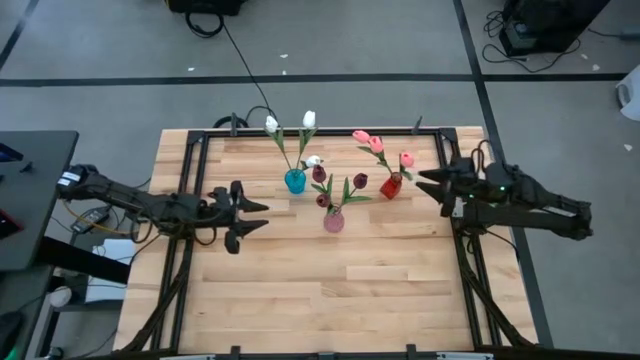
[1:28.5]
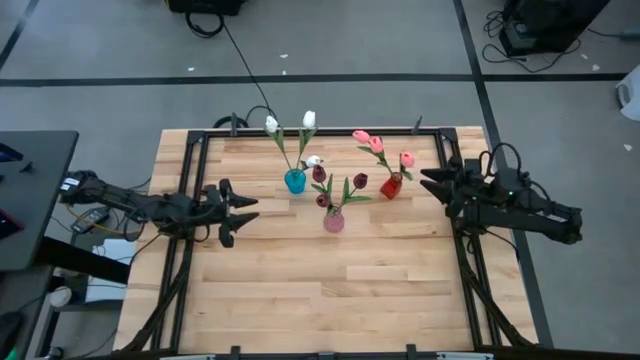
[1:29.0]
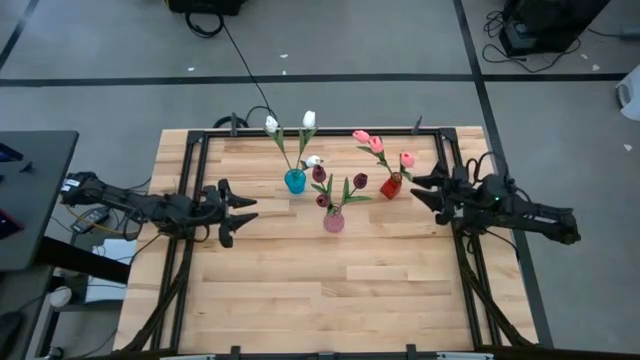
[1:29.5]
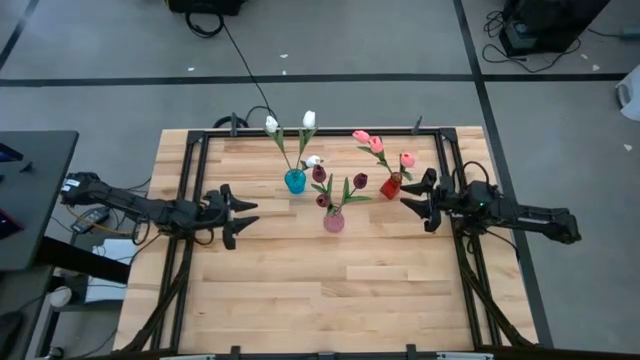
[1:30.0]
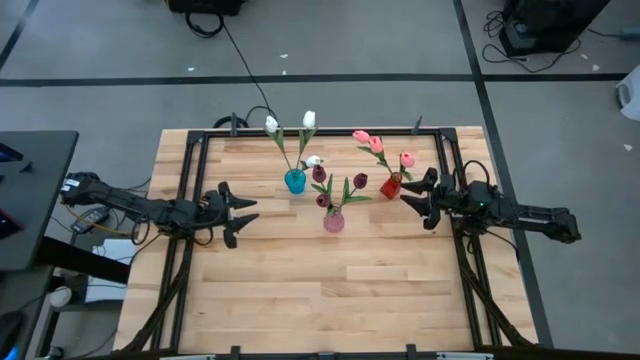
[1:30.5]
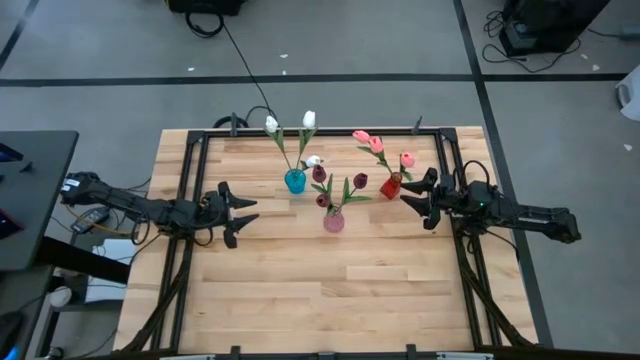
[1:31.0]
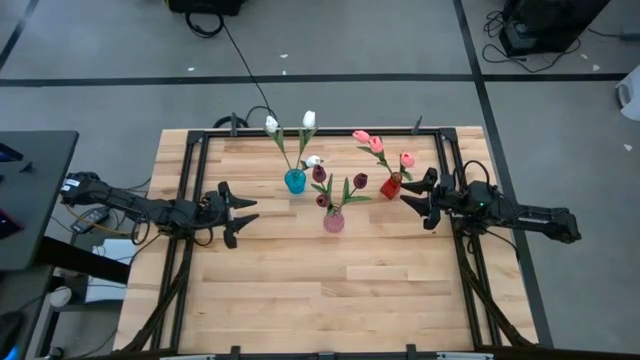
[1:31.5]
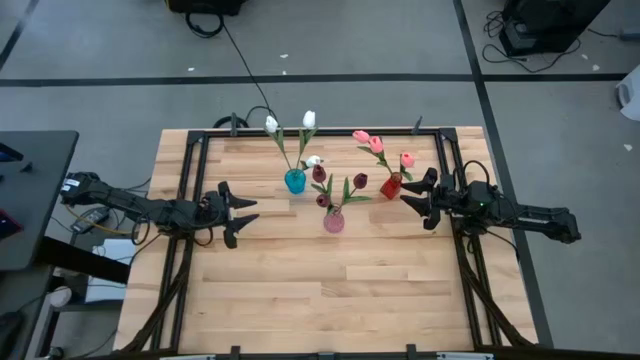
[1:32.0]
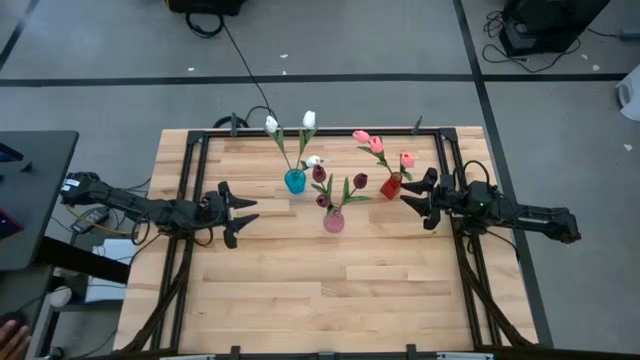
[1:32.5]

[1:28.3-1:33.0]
Task: Sort flowers into vase by color
Return to Home Position

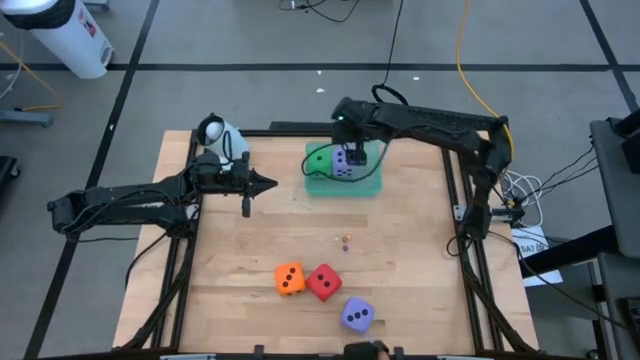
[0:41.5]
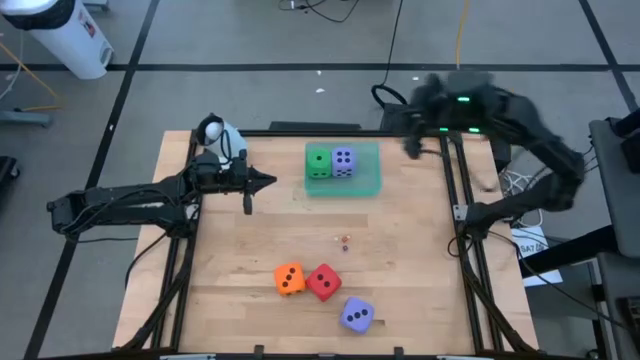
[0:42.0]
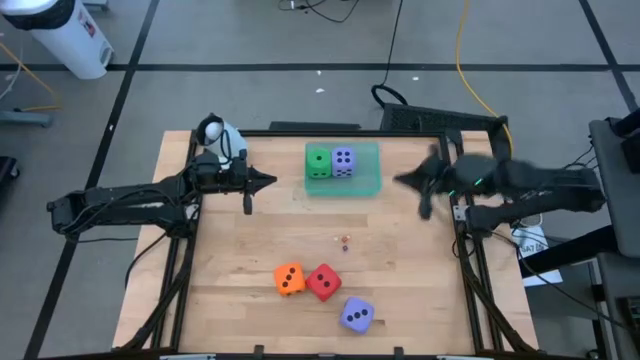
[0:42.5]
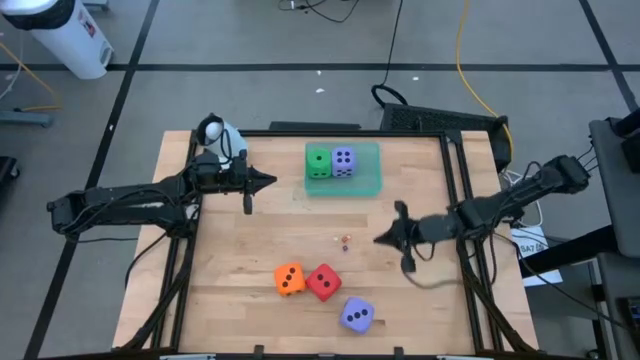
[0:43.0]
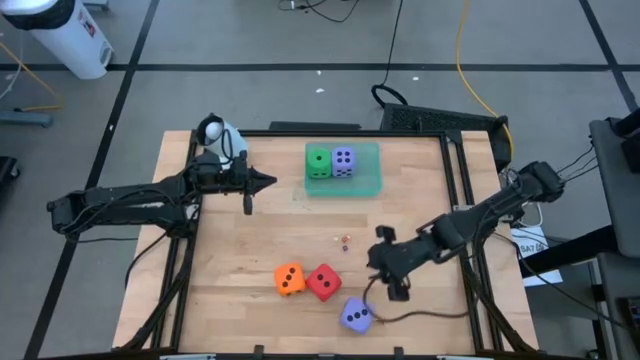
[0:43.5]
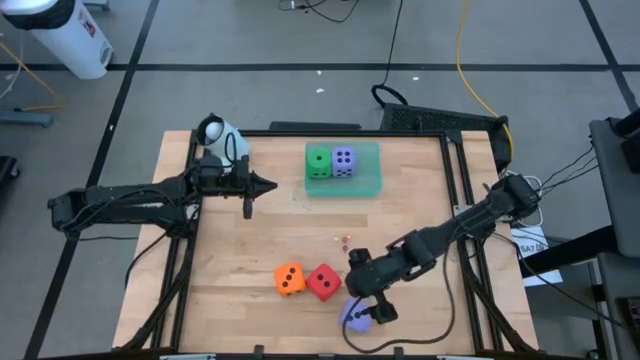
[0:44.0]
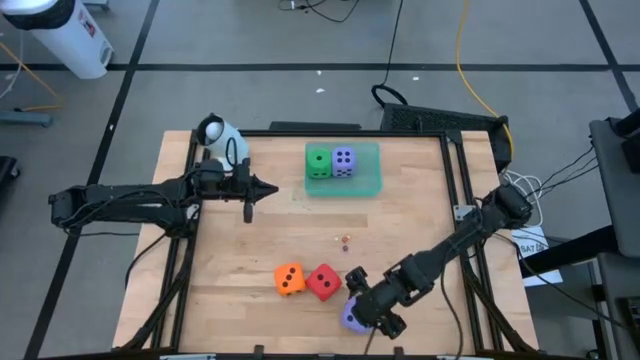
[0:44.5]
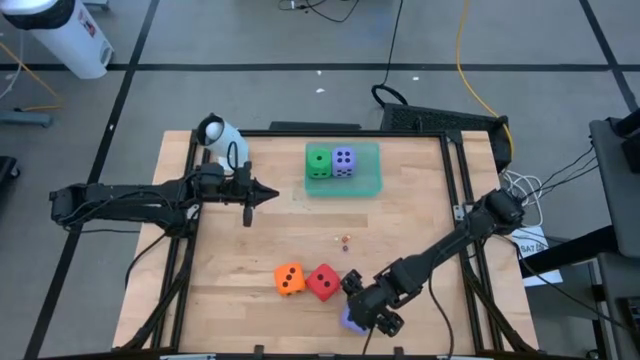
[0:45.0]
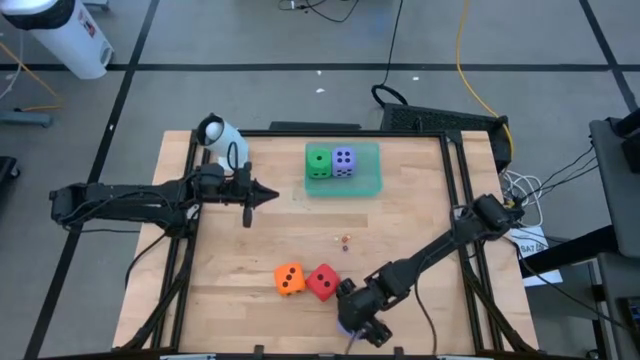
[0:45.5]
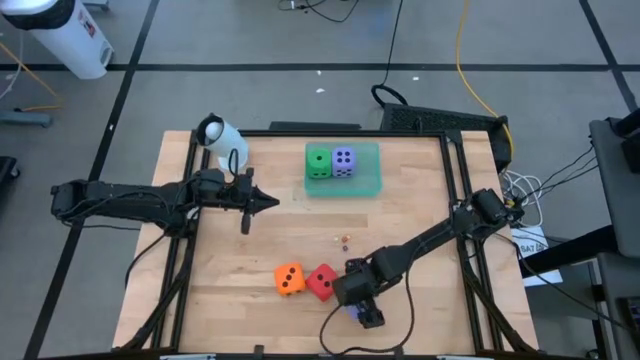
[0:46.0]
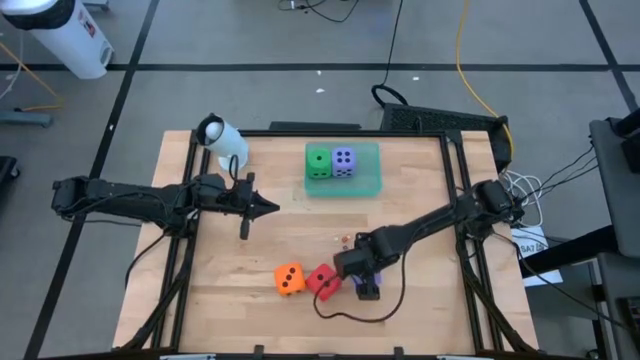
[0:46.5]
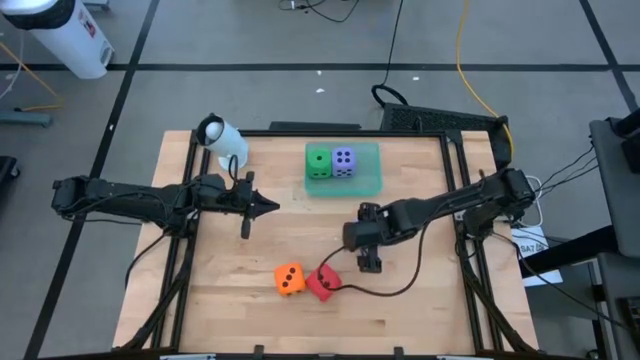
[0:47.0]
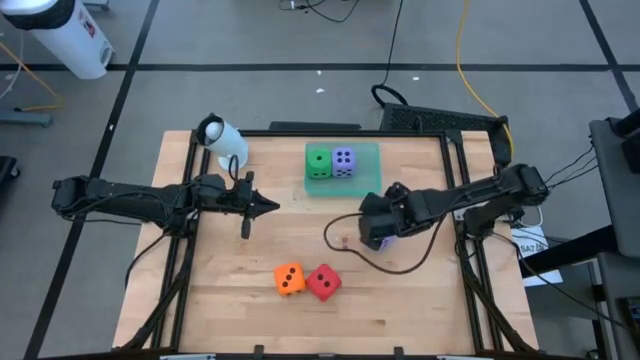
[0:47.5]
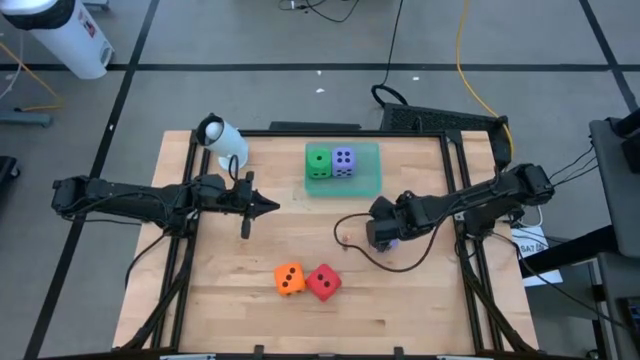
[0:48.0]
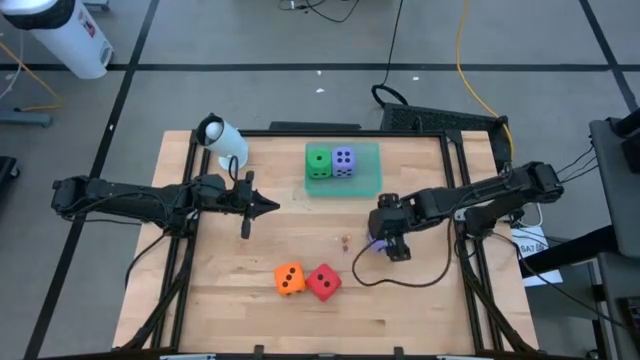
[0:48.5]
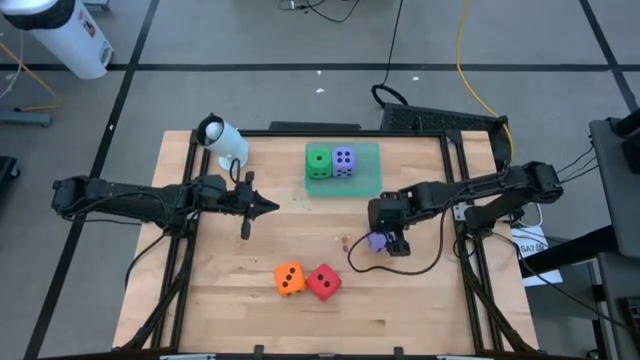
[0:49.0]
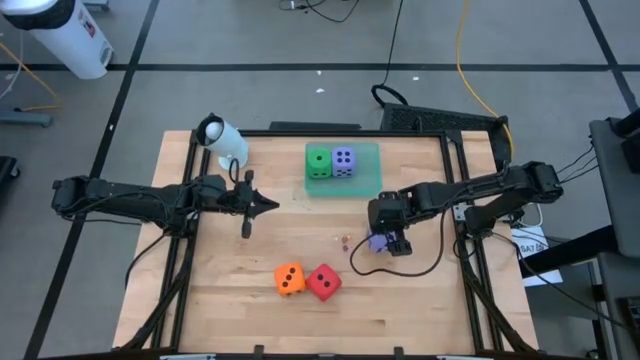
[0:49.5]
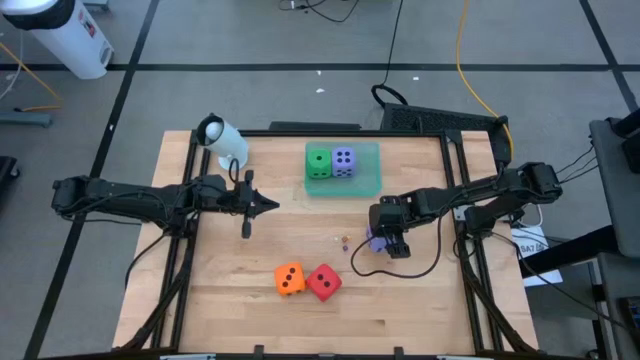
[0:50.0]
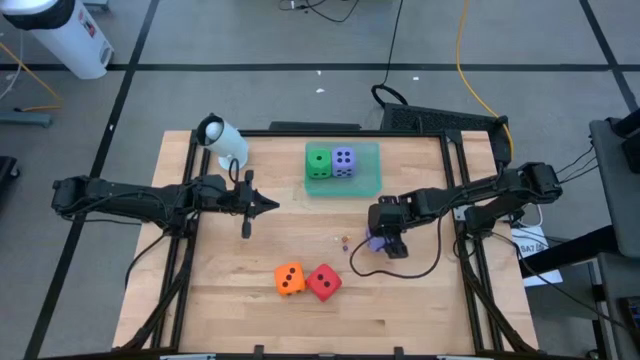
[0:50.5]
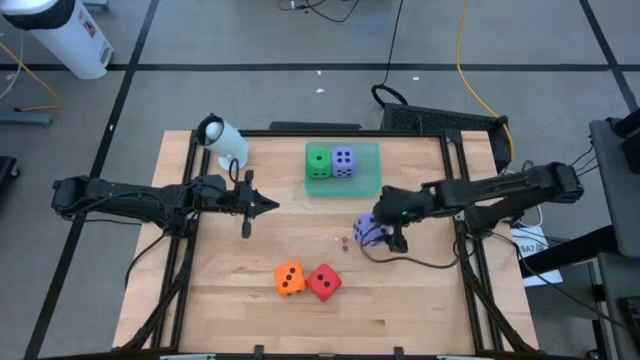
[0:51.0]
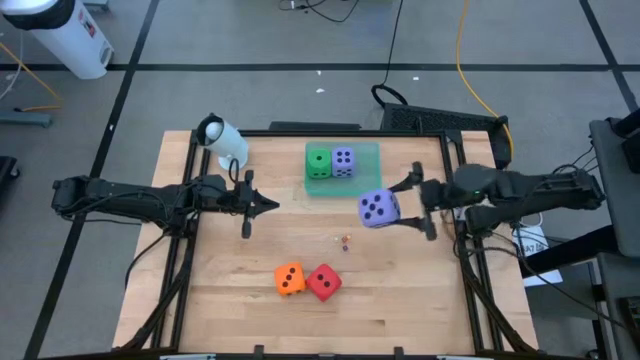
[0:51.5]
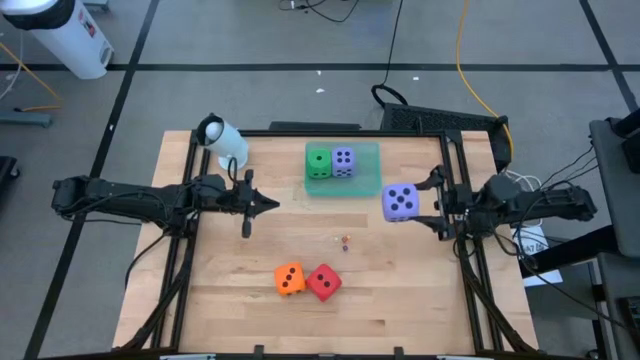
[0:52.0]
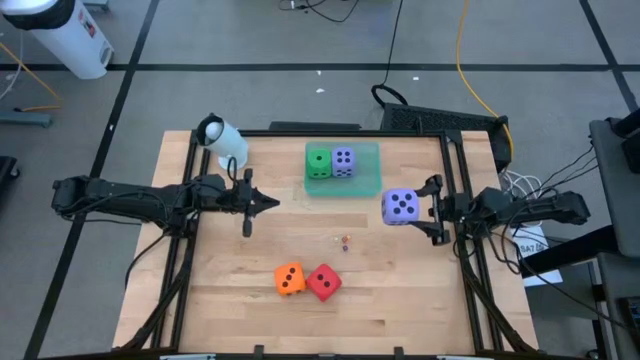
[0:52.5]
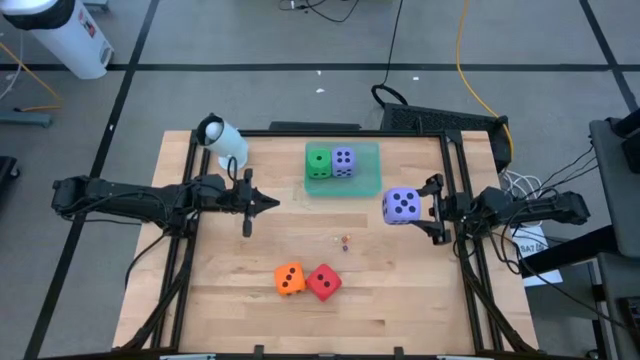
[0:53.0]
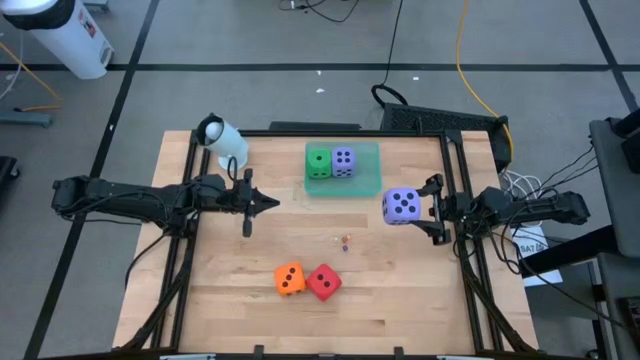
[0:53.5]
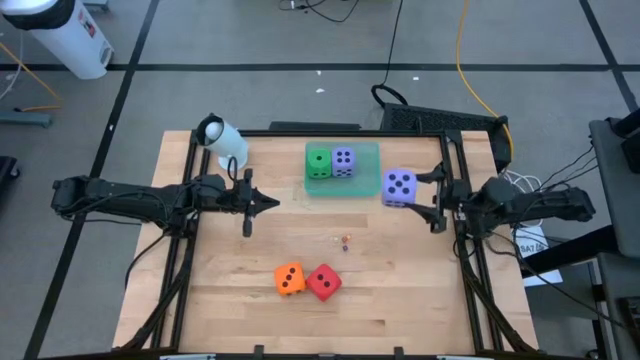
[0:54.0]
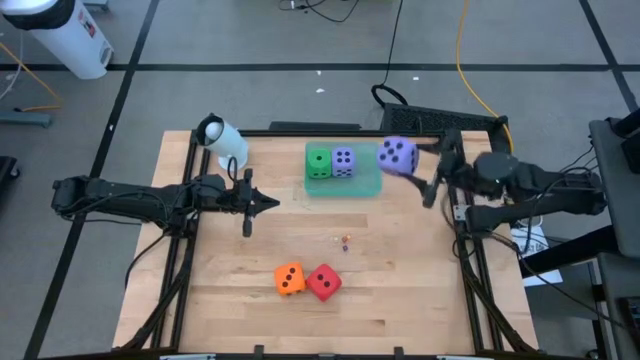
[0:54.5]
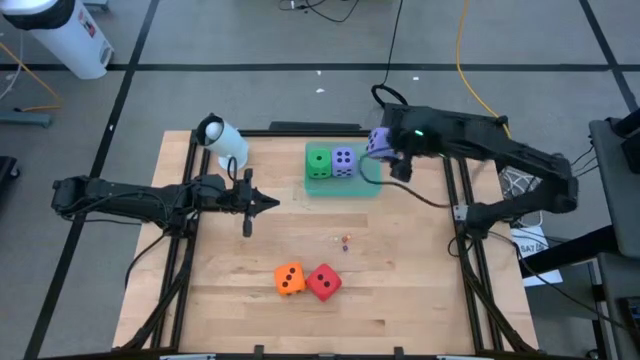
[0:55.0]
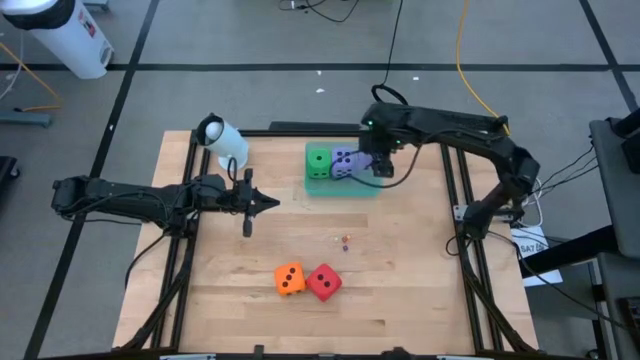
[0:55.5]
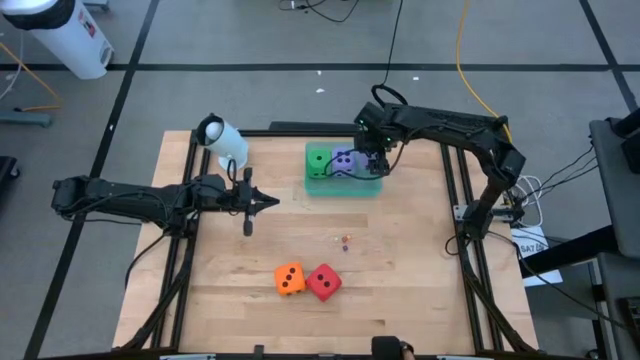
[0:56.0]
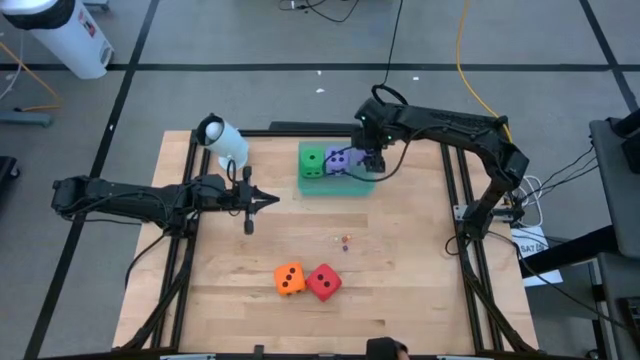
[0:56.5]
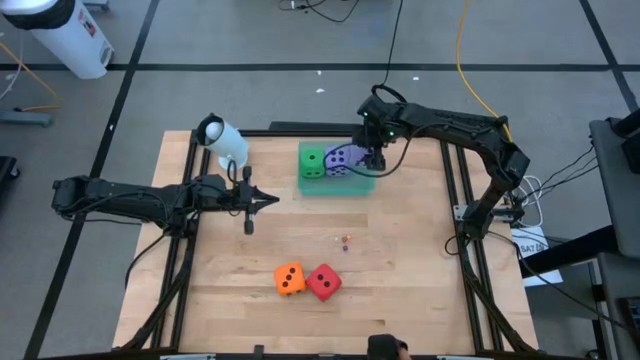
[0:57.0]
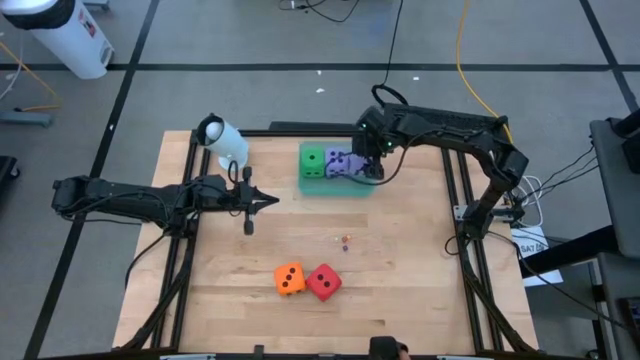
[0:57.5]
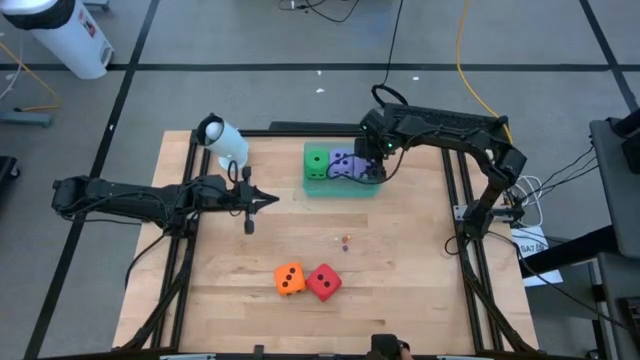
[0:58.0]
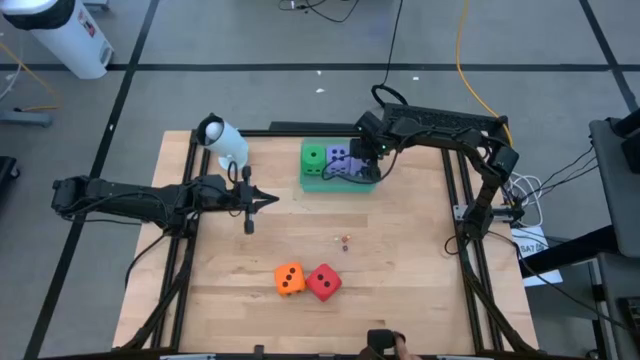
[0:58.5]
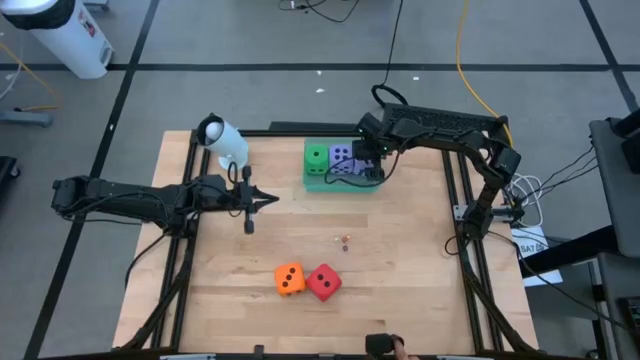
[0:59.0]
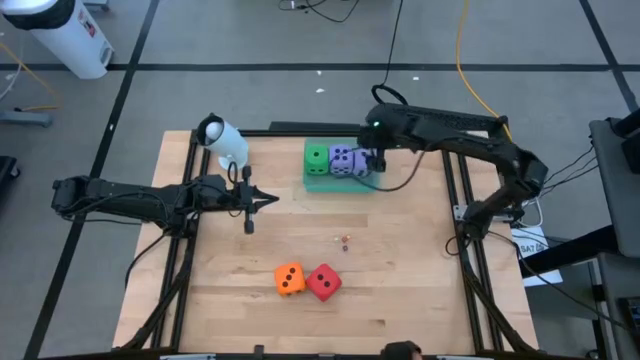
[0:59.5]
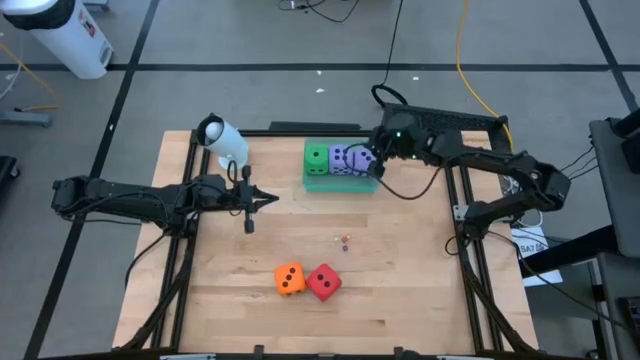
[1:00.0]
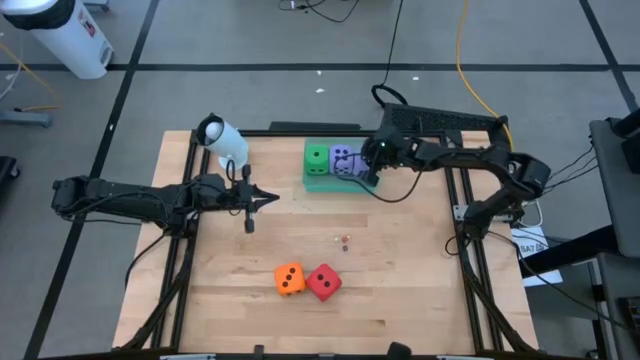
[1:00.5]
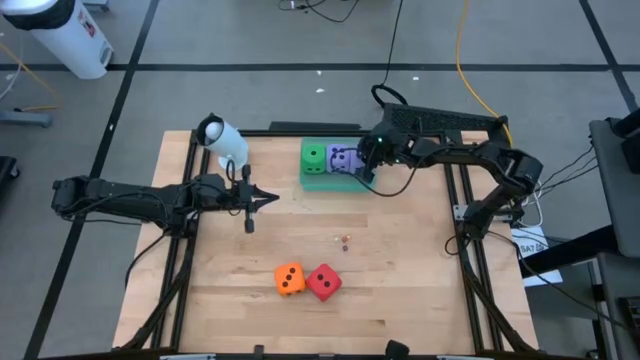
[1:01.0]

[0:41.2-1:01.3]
Task: Pick & Place Dice
Put the large purple dice into the blue bin
